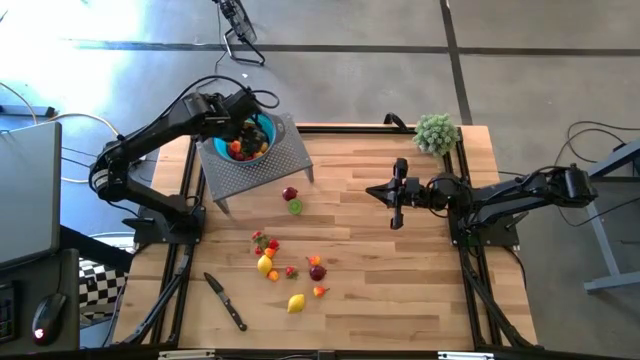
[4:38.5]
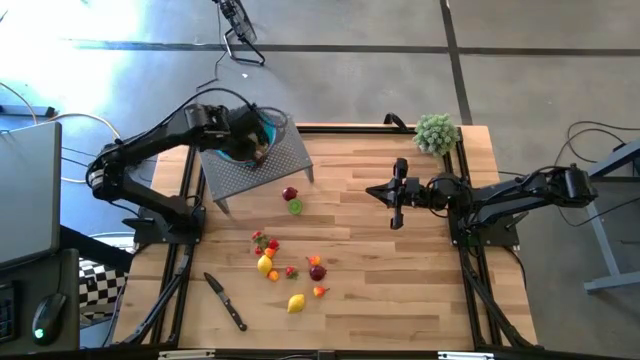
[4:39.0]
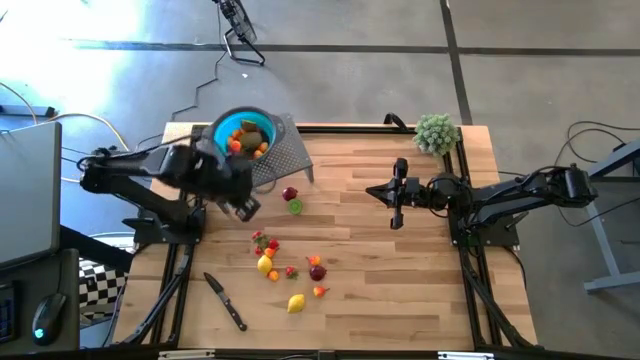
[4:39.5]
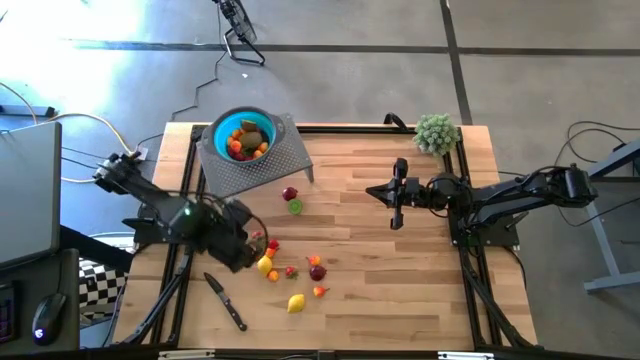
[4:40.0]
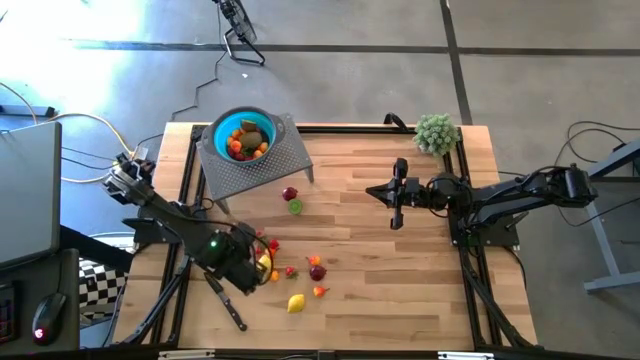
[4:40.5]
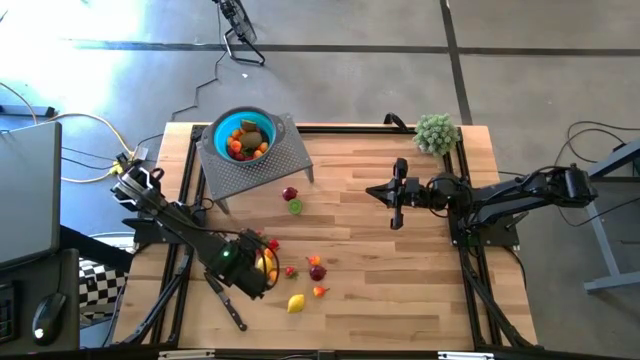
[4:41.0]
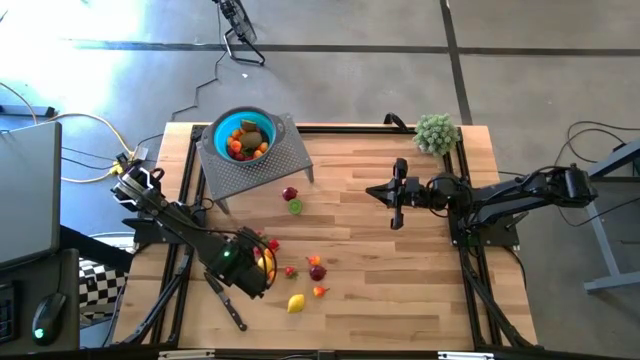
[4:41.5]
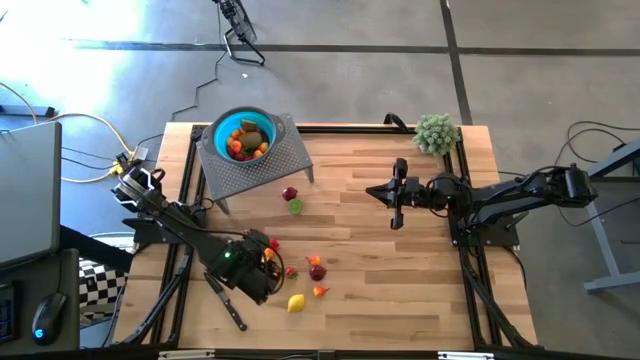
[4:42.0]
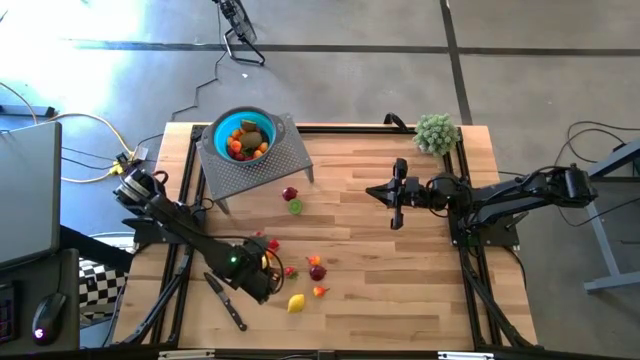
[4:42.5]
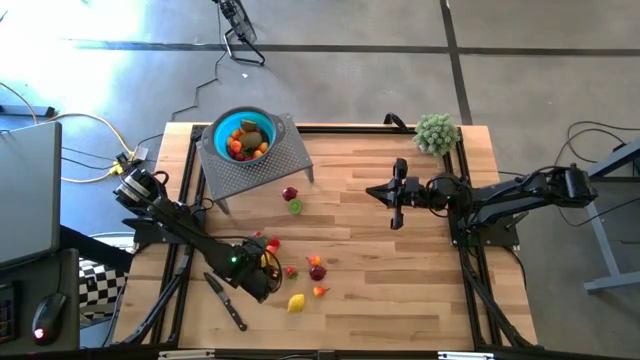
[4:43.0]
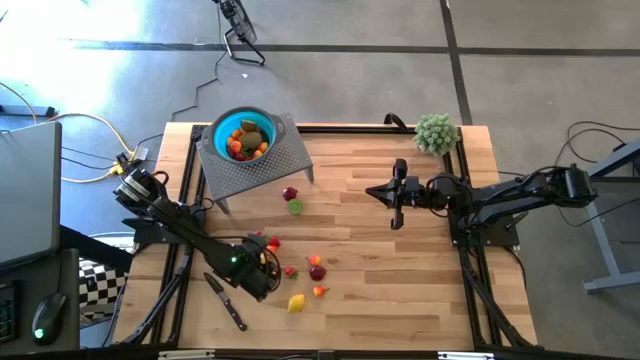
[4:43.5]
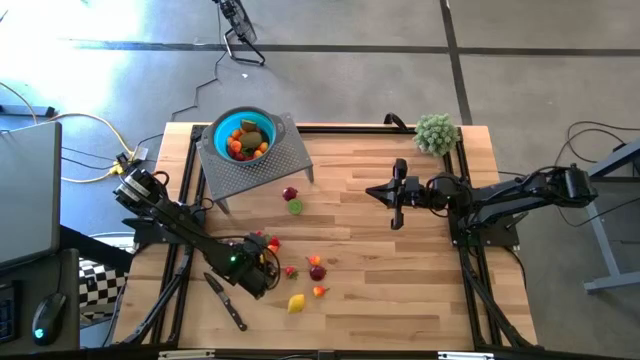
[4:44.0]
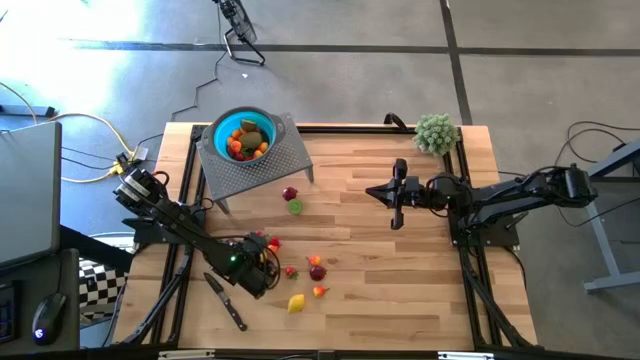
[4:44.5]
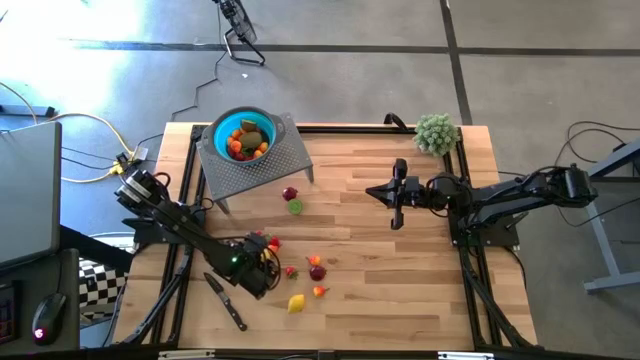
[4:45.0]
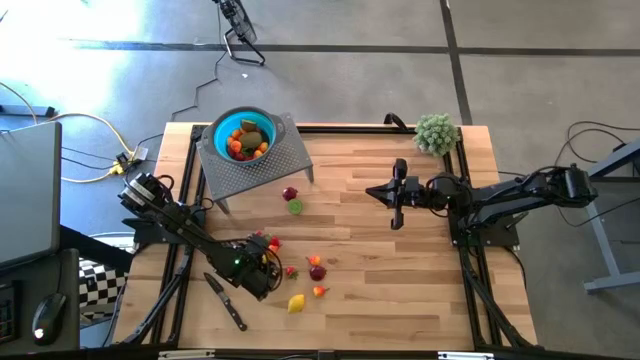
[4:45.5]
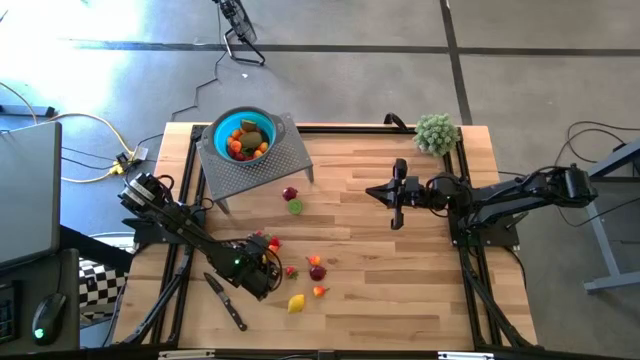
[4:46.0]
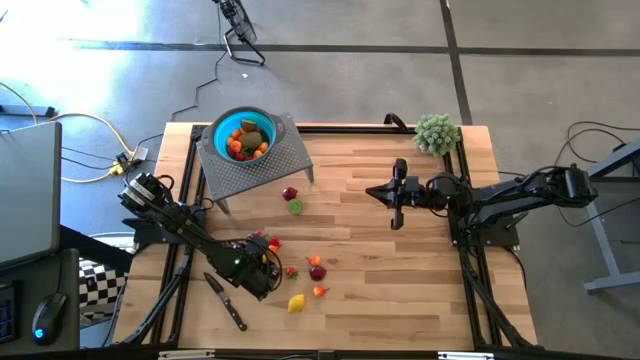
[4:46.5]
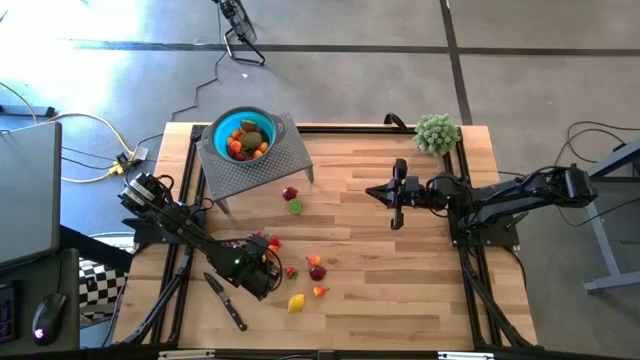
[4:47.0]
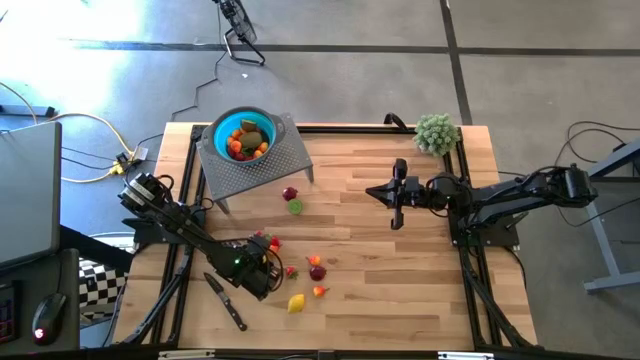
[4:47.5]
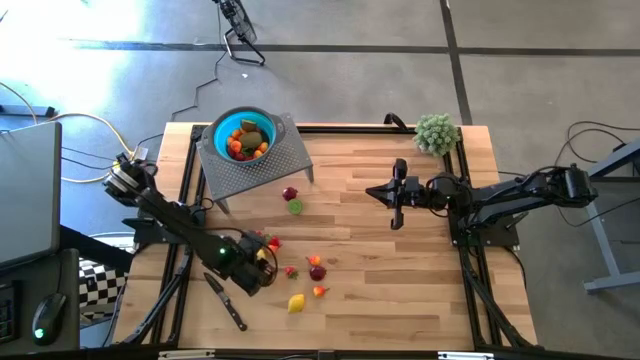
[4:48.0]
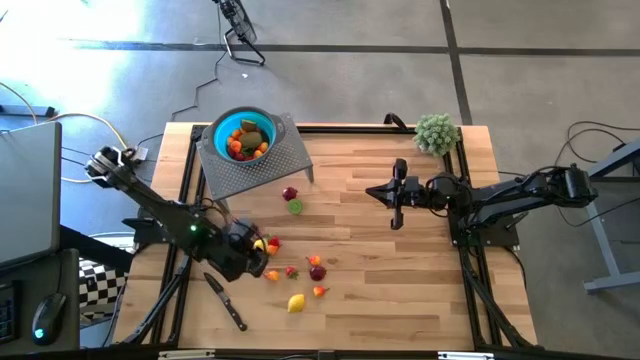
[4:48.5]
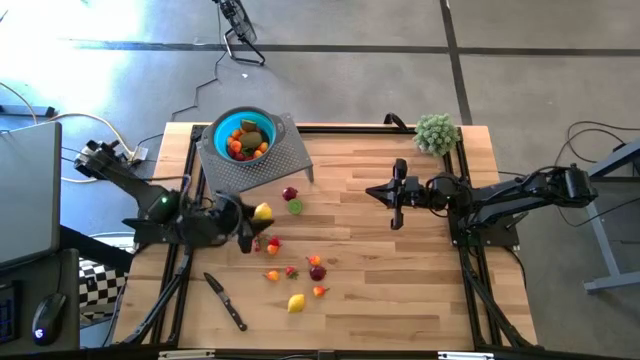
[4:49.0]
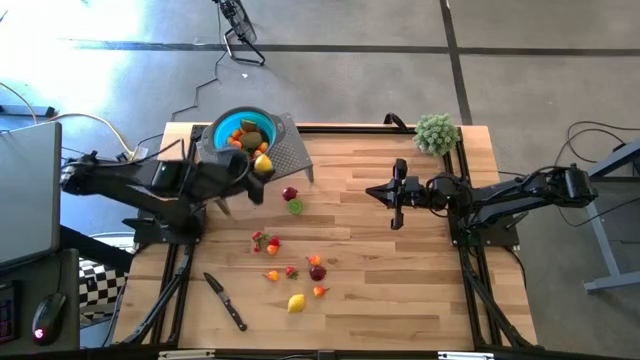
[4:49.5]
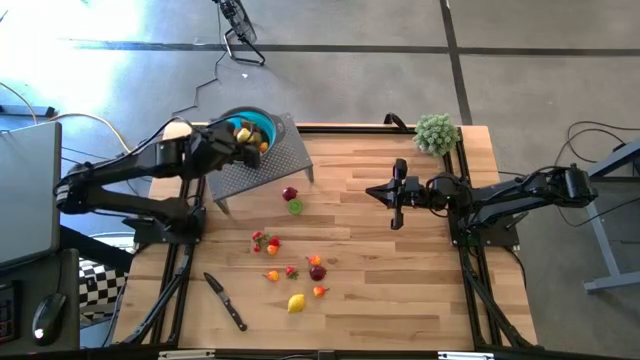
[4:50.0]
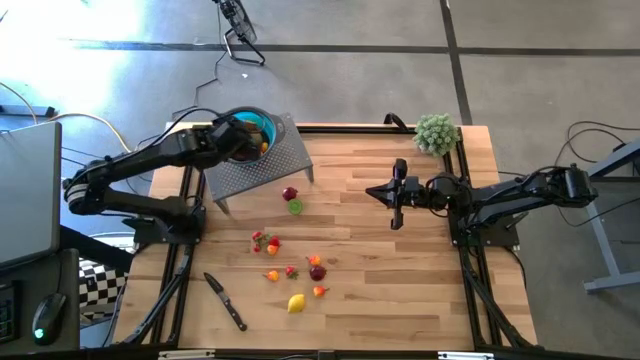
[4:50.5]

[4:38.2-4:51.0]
Task: Pick & Place Fruit
Put the left yellow lemon into the blue strainer bowl on the shelf

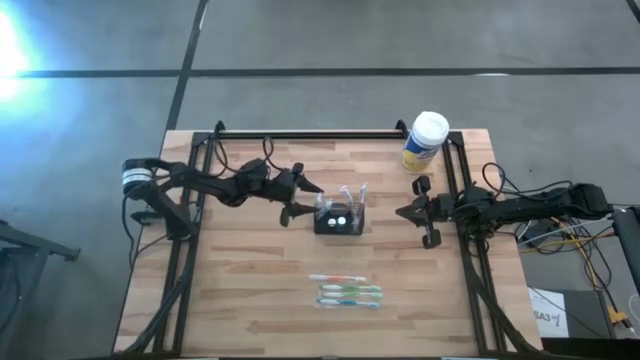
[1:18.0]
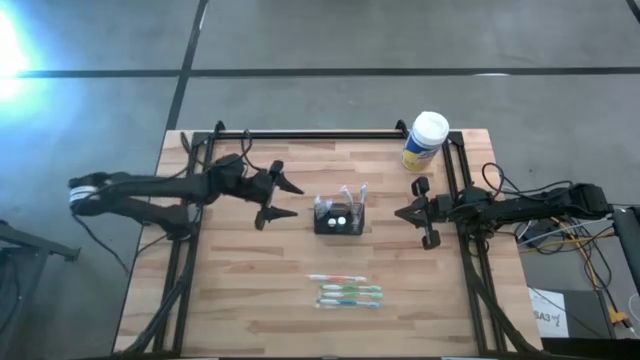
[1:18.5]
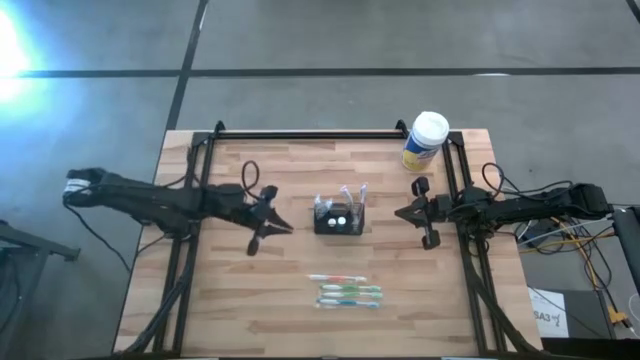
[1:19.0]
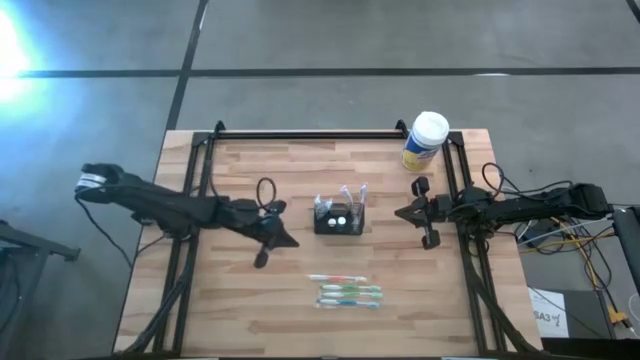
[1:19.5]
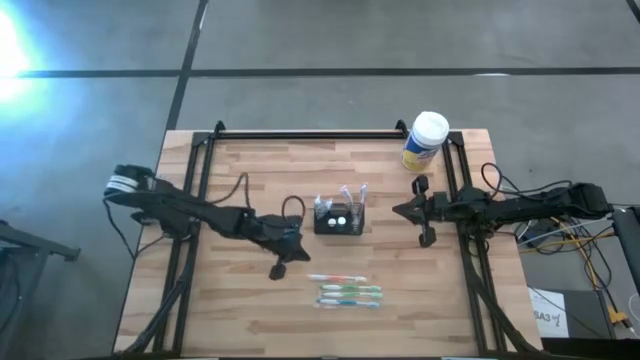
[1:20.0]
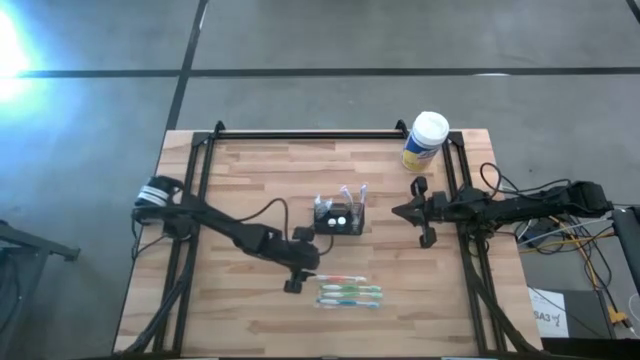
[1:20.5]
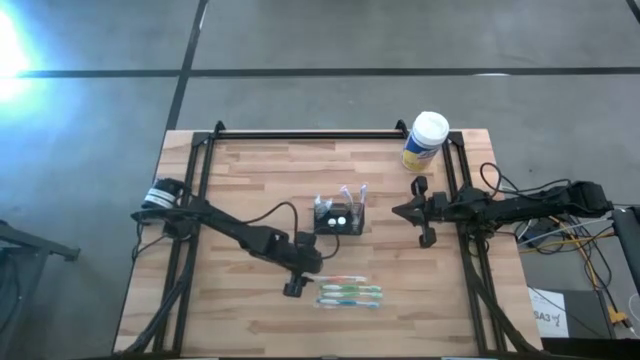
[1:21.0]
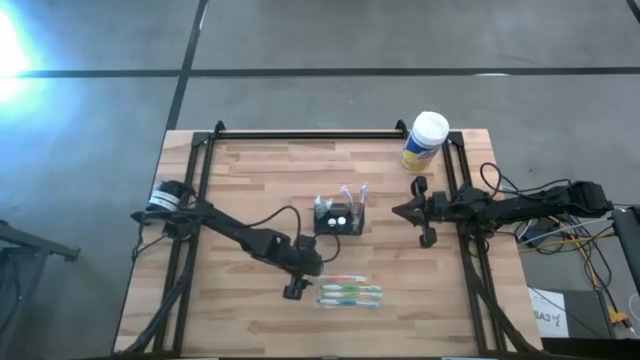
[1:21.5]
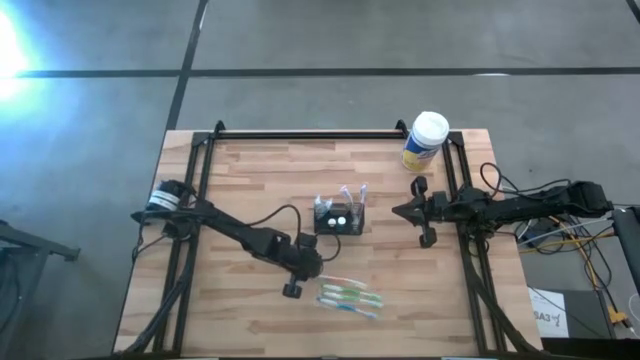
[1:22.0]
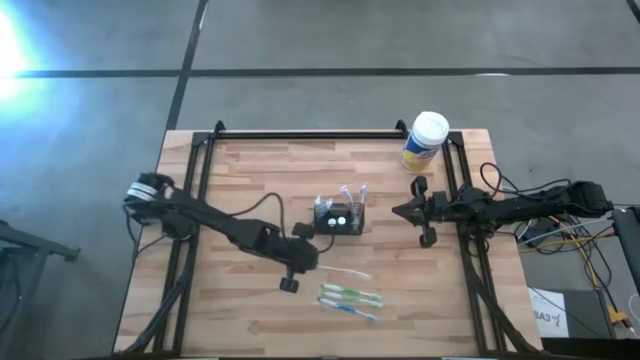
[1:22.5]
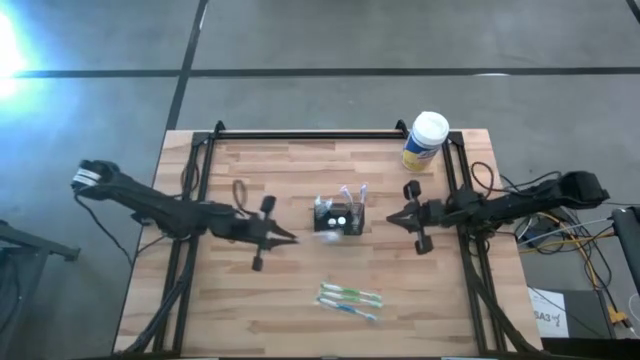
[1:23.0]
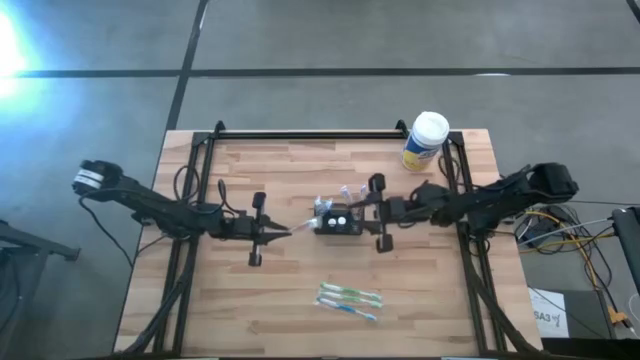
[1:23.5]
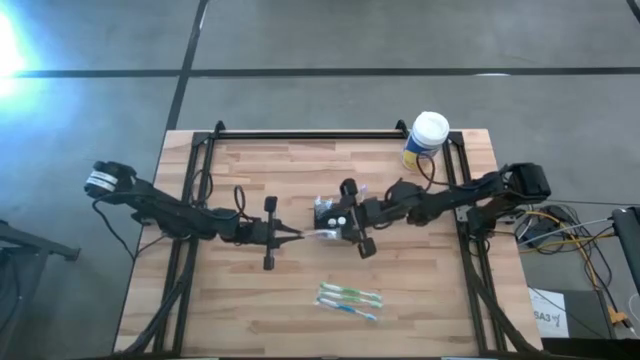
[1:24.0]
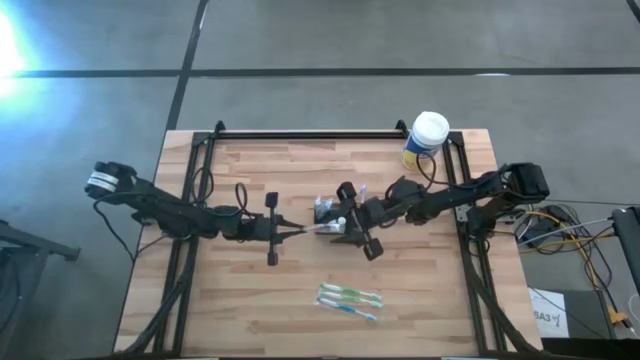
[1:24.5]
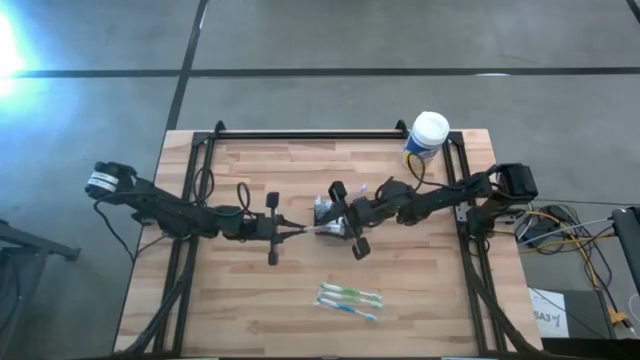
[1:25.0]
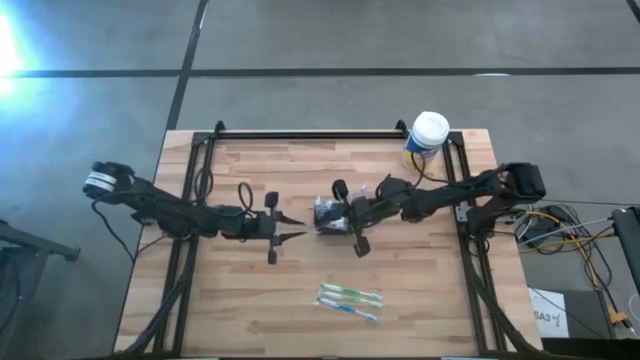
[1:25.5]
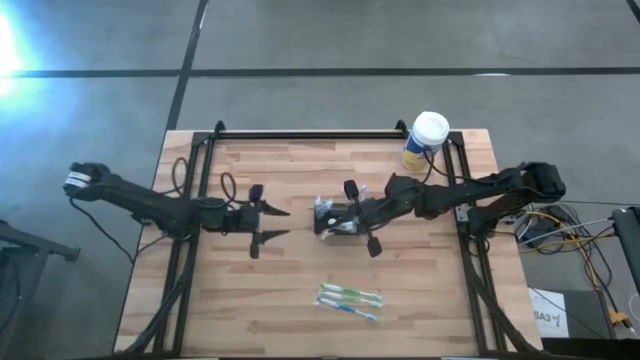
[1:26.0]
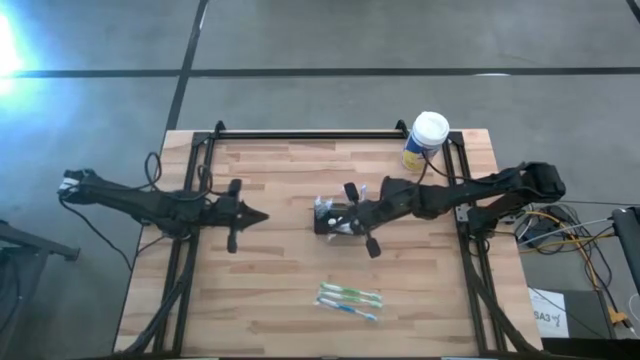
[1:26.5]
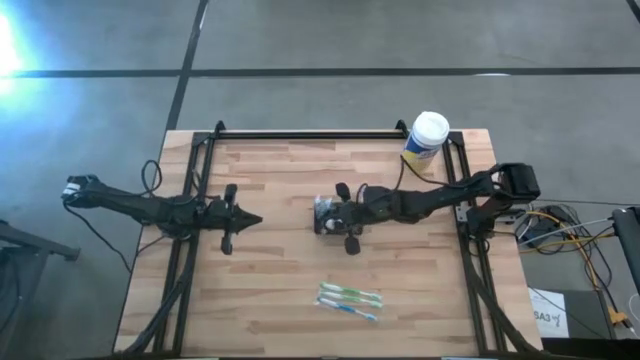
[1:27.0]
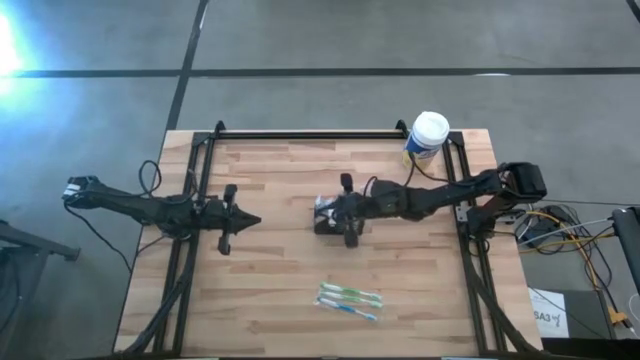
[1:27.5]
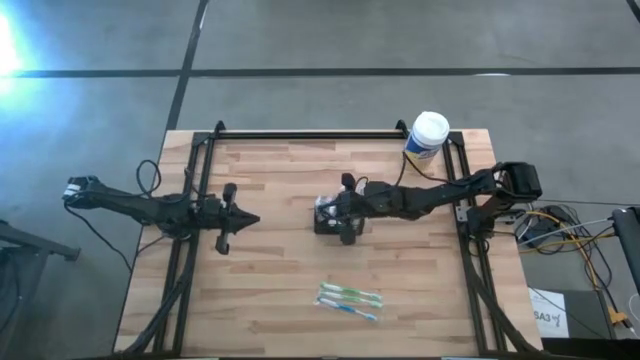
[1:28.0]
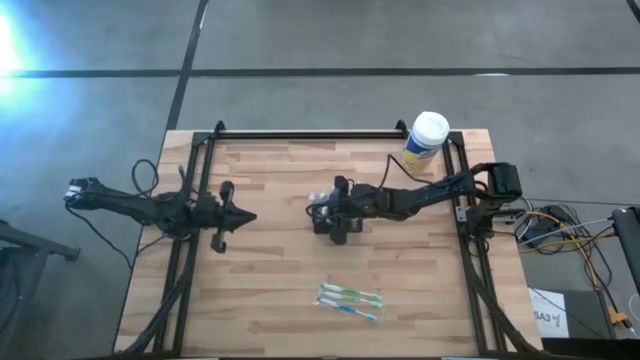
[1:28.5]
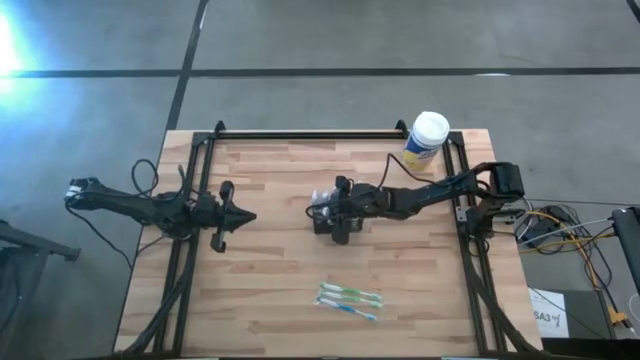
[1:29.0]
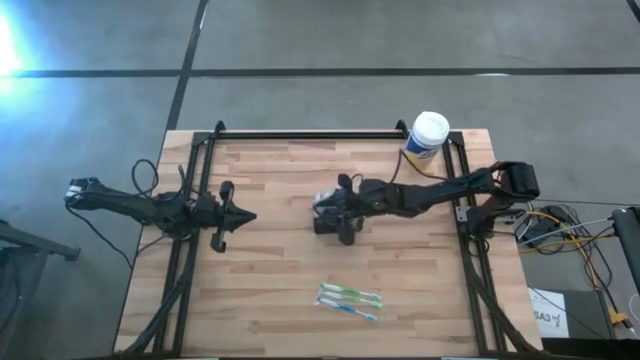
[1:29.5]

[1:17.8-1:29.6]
Task: Pick & Place toothbrushing station
Put the orange toothbrush into the wire organizer
